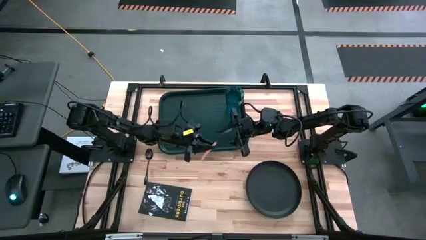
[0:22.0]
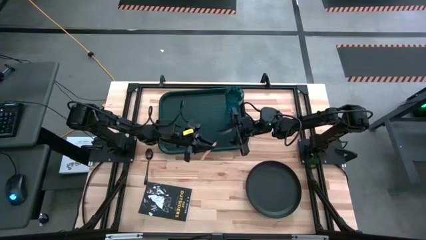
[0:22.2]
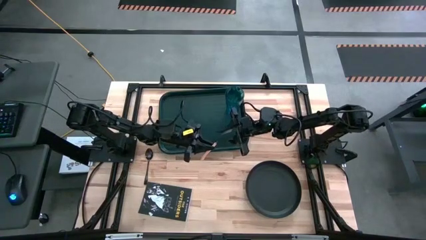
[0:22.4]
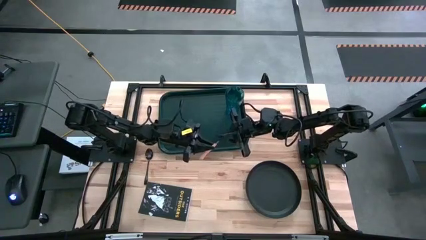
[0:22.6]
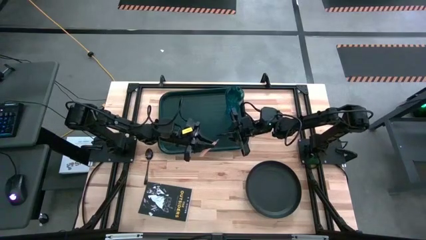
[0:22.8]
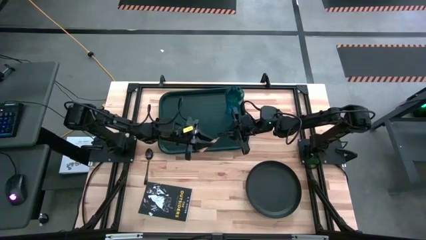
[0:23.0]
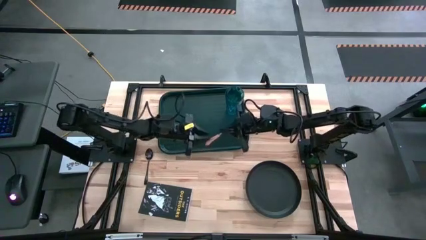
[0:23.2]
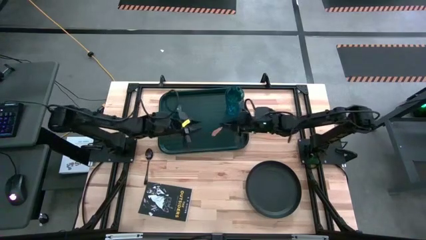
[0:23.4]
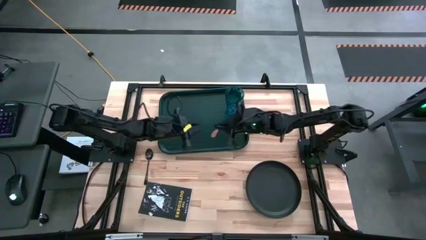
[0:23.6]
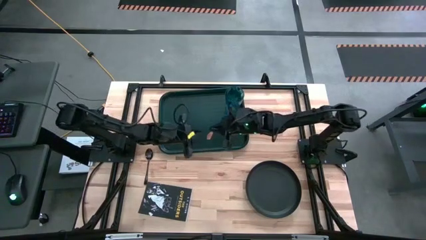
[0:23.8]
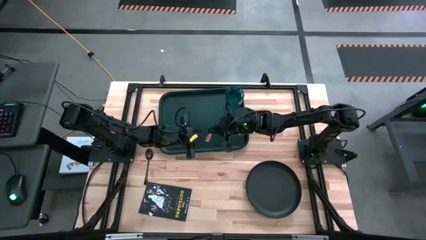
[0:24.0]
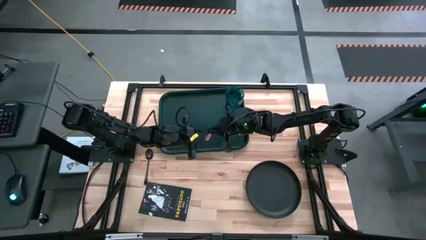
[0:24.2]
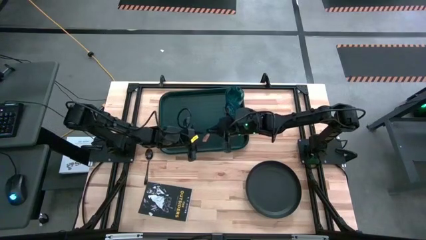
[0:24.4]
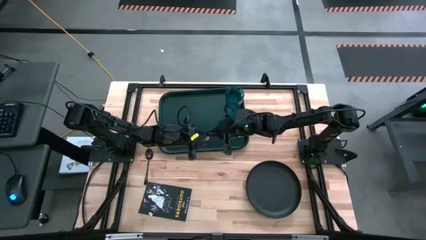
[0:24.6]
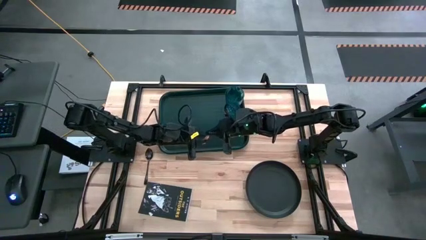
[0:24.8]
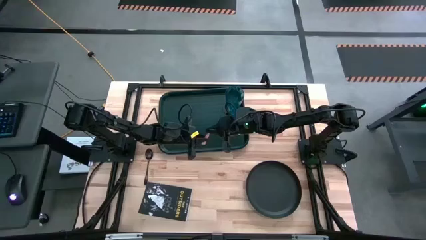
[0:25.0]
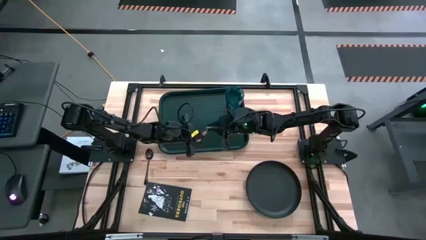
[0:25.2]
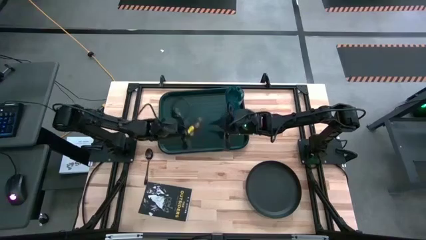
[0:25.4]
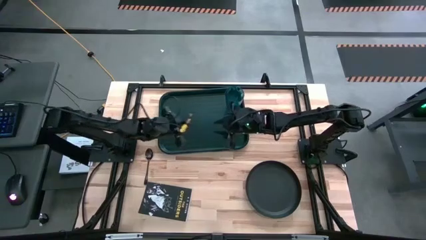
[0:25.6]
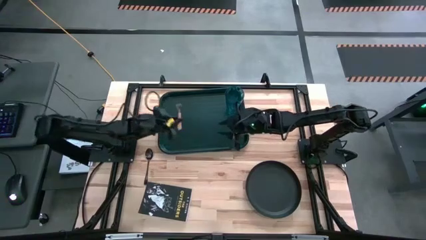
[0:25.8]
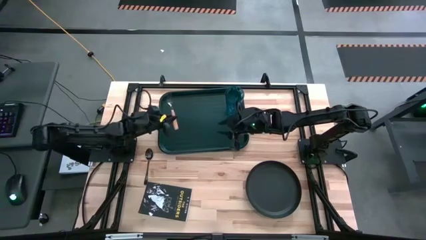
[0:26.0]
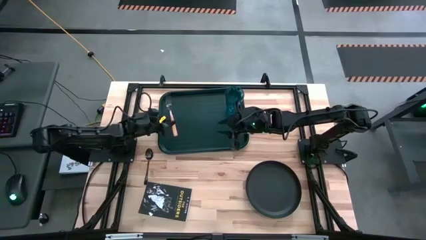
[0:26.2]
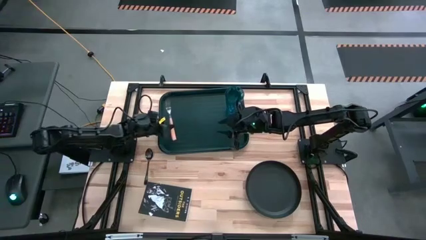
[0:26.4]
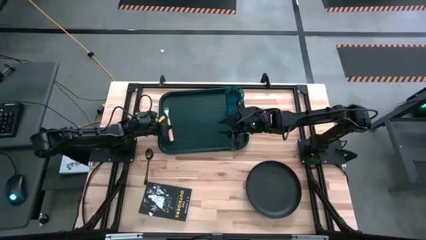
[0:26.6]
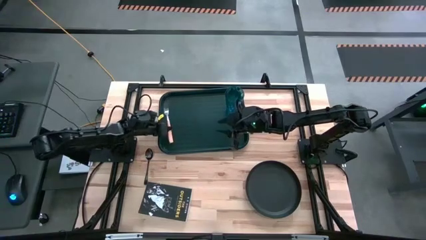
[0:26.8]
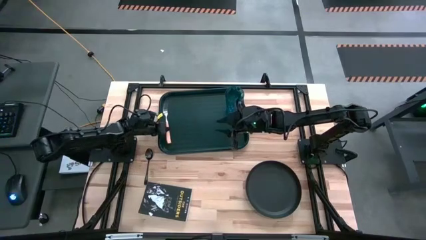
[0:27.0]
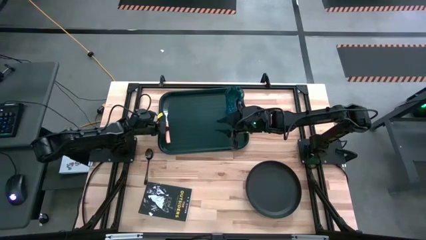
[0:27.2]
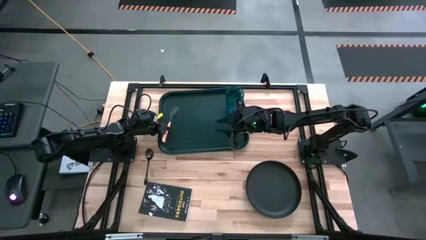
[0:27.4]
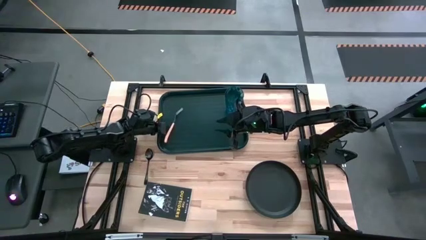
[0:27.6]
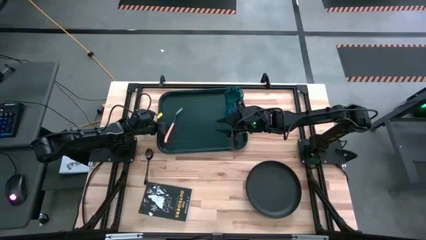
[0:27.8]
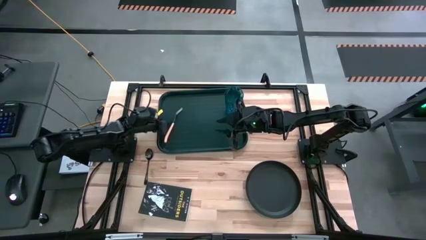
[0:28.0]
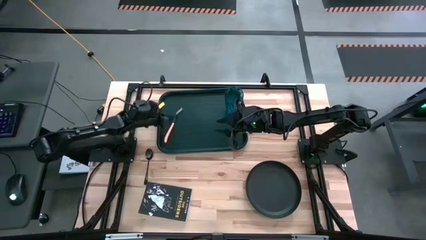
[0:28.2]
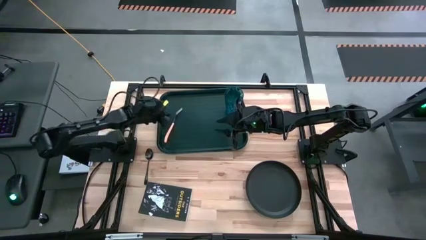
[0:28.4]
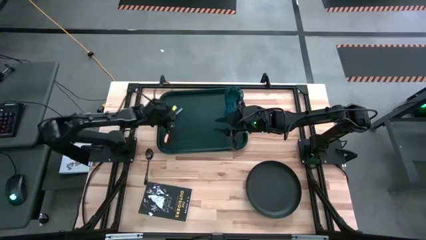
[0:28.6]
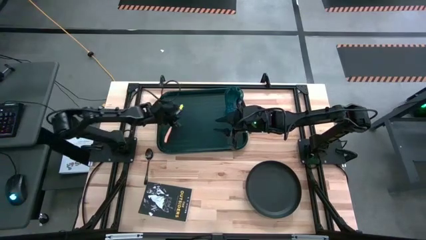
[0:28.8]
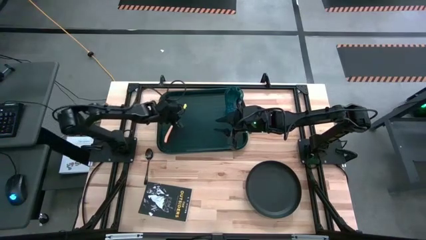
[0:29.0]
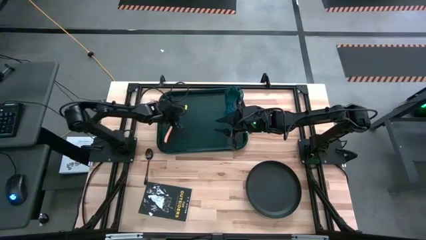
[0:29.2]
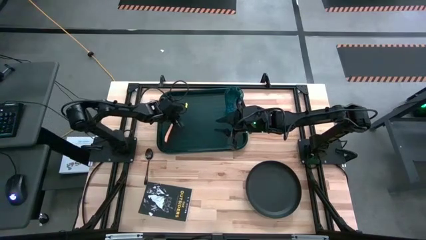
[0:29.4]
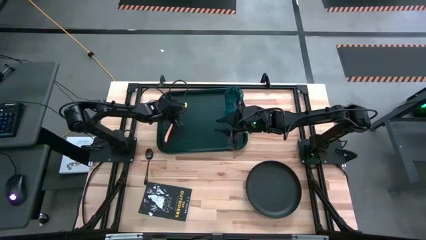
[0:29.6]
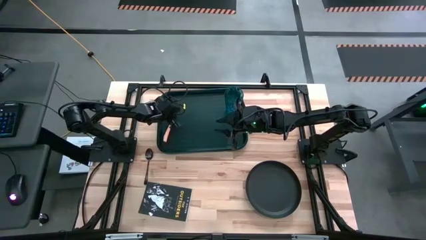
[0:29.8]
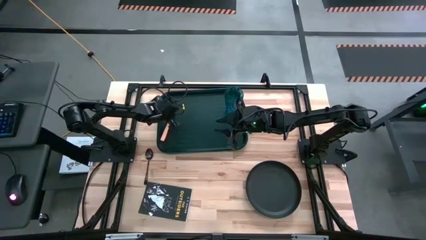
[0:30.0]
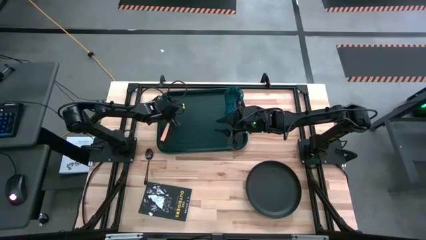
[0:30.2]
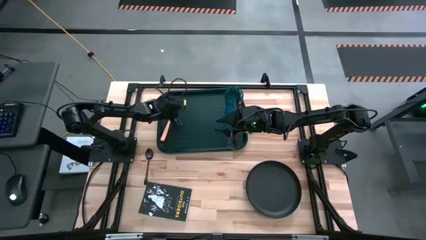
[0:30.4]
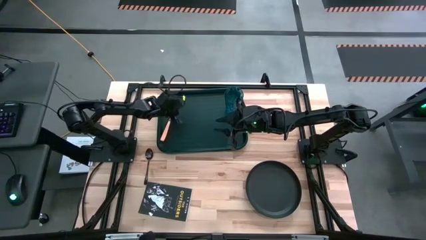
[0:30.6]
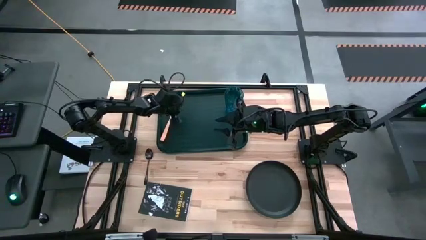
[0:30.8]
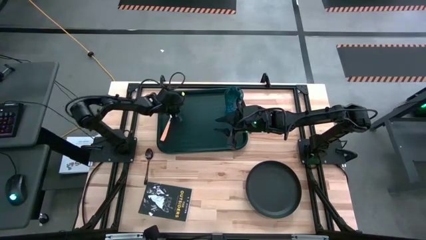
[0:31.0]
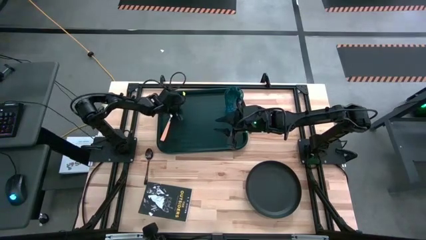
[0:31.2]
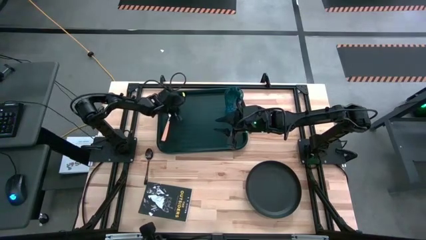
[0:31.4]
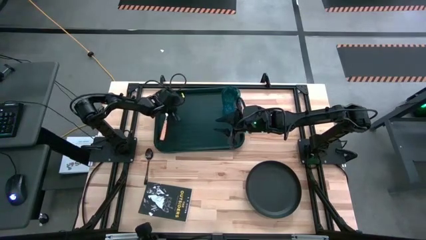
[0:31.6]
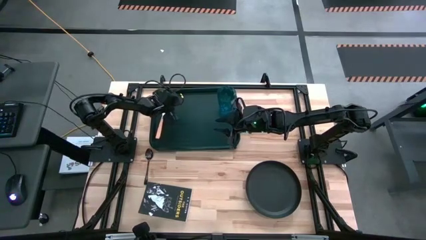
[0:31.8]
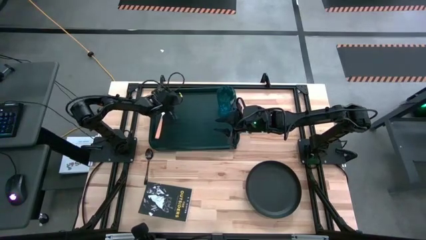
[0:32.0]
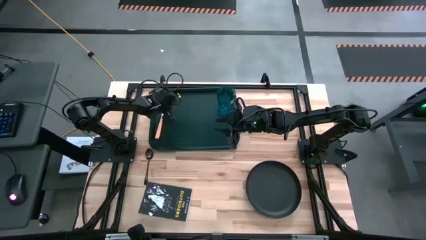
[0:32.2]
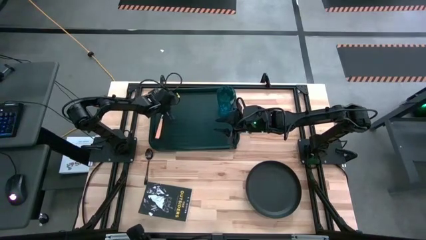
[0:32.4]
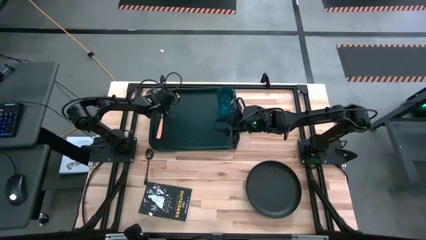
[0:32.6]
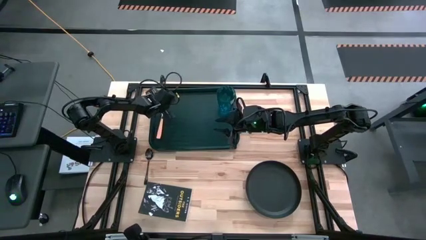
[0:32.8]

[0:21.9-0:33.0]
Task: Pick and place plate/cup/fork/spoon on tray
Put the orange fork on the left side of the black tray

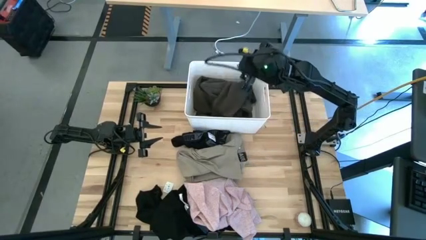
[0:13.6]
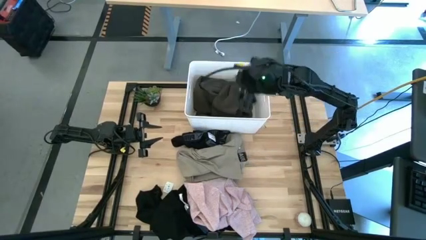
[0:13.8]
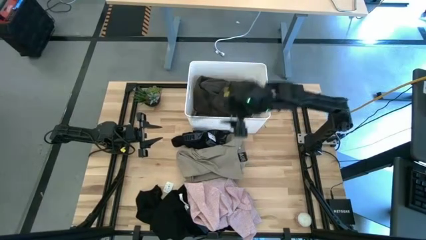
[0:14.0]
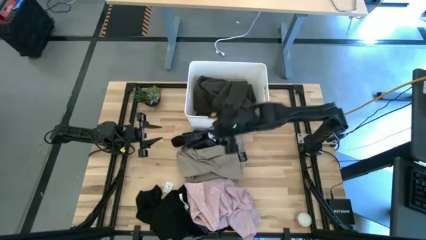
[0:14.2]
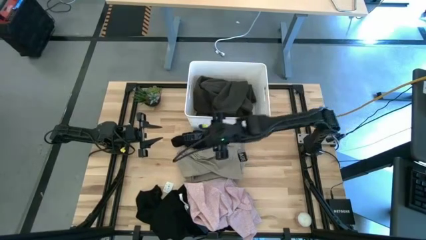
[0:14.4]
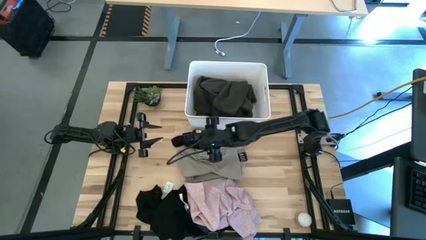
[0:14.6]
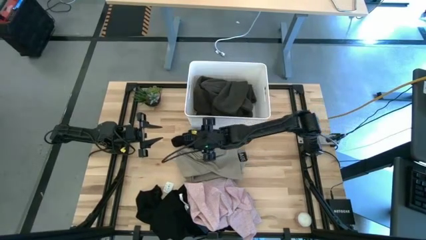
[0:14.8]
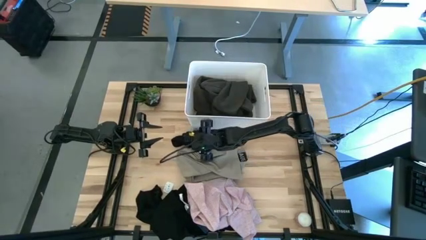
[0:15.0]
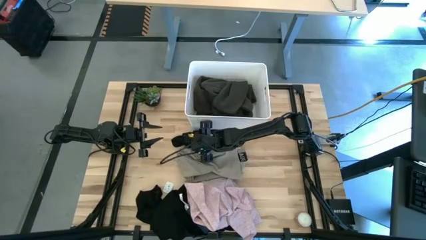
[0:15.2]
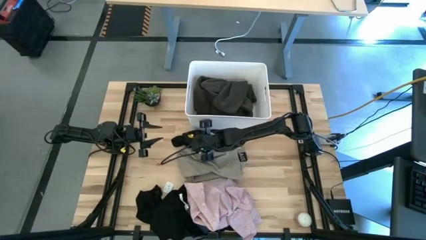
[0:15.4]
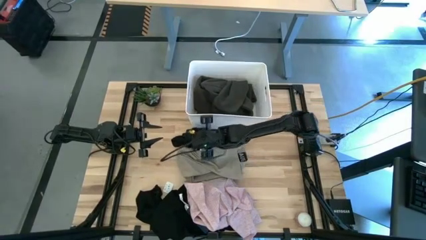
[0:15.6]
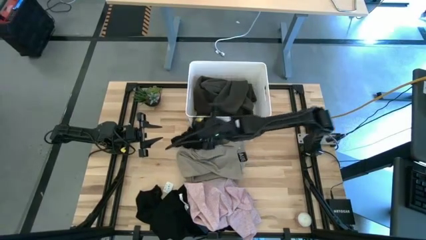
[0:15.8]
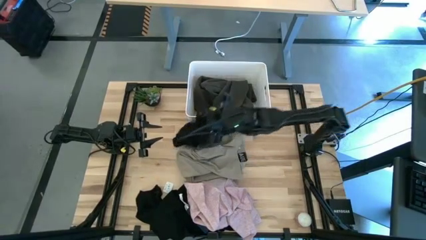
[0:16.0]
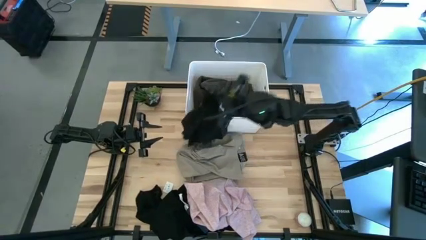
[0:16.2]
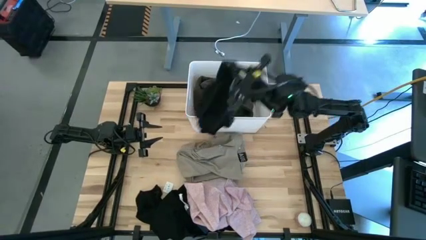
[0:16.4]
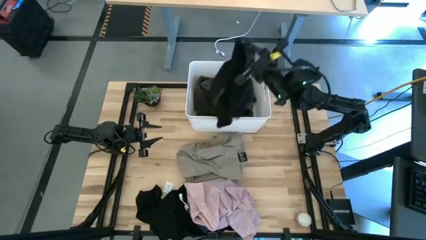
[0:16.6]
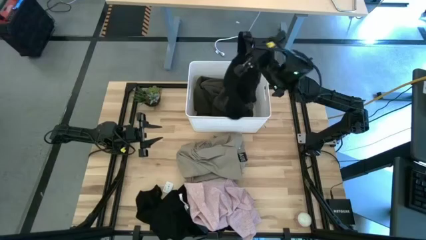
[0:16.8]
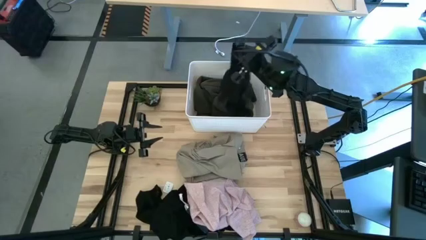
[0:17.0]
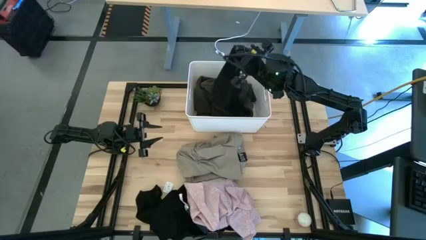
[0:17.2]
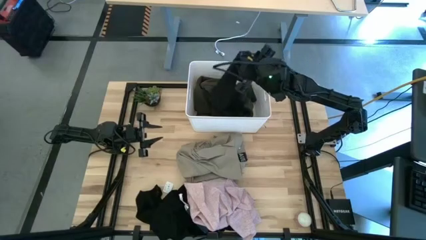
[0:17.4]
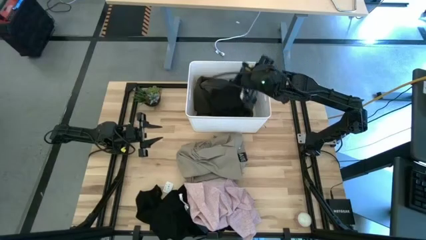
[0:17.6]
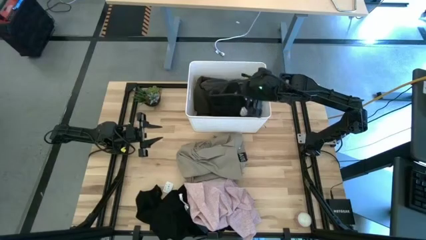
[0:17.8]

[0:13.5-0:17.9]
Task: Sort clothes
Put the black boxer into the white laundry bin
